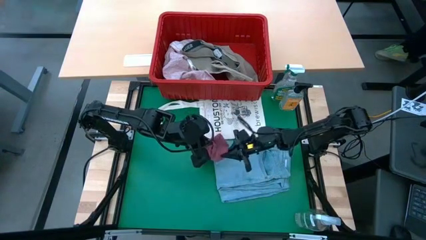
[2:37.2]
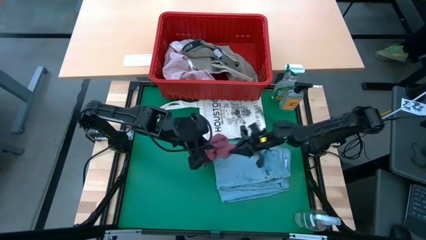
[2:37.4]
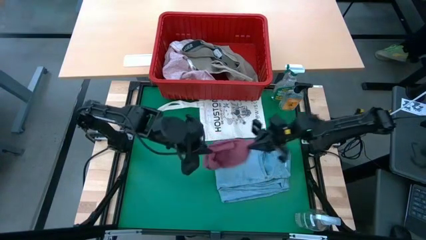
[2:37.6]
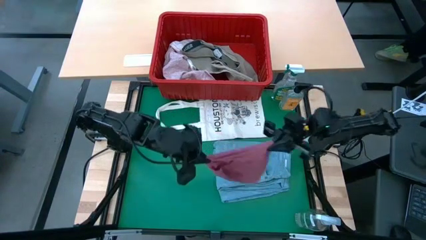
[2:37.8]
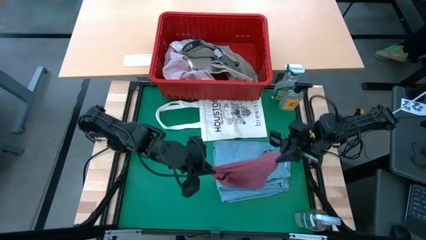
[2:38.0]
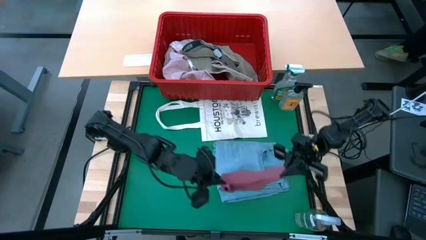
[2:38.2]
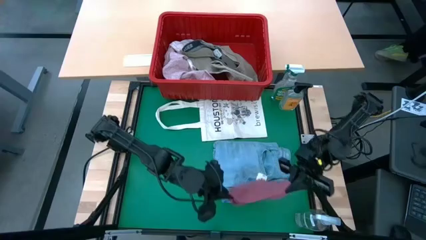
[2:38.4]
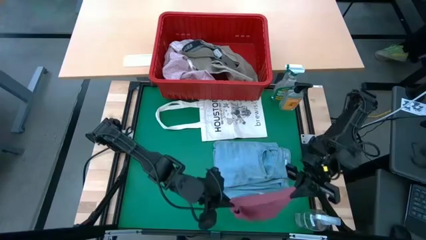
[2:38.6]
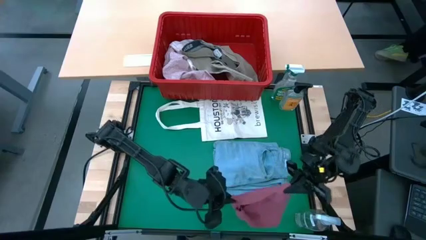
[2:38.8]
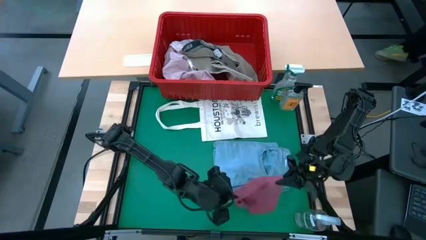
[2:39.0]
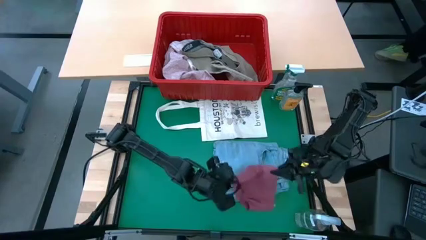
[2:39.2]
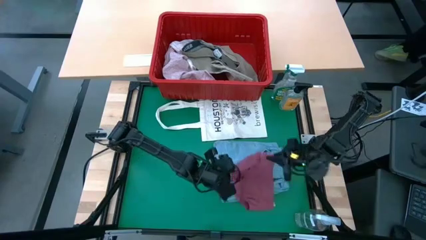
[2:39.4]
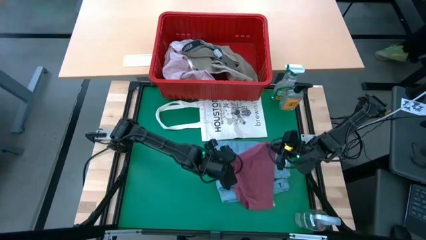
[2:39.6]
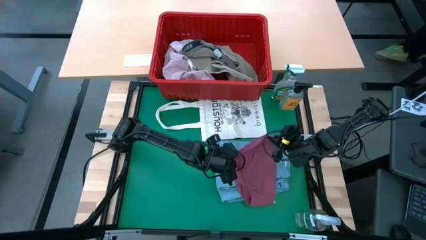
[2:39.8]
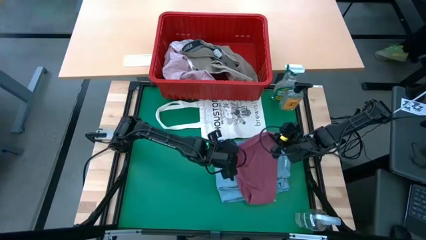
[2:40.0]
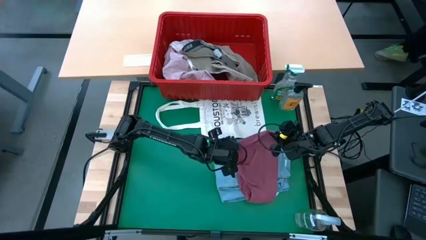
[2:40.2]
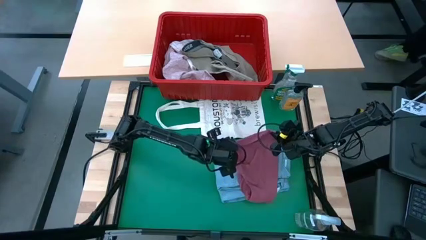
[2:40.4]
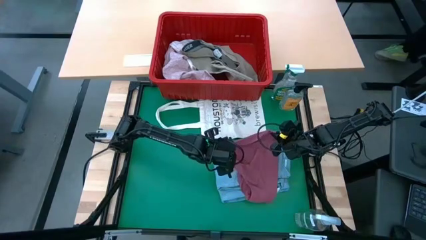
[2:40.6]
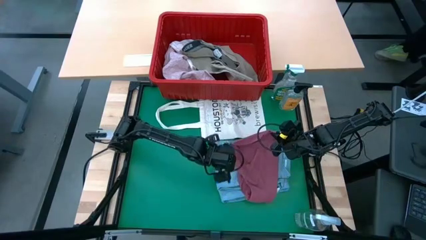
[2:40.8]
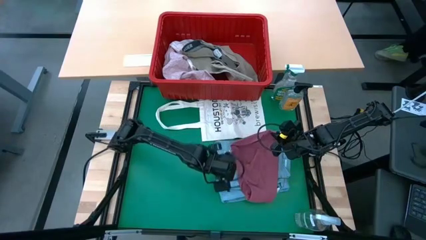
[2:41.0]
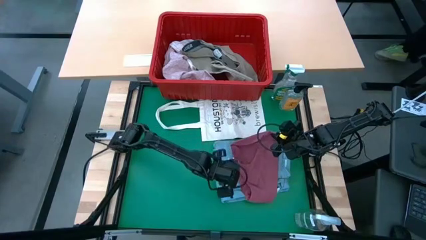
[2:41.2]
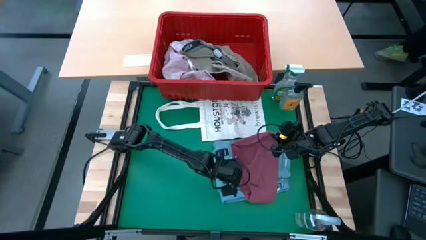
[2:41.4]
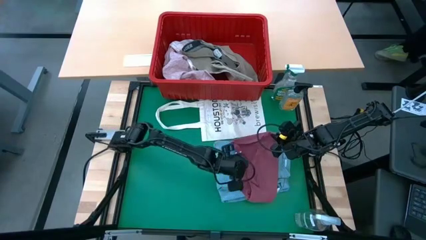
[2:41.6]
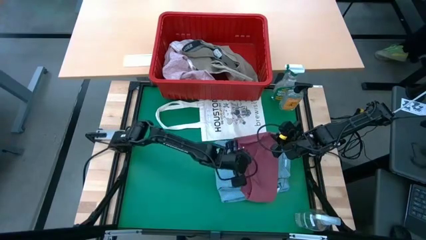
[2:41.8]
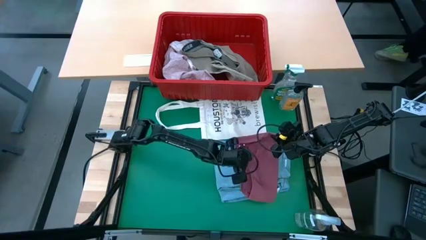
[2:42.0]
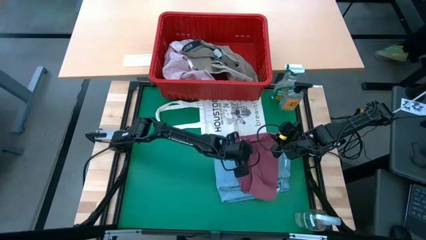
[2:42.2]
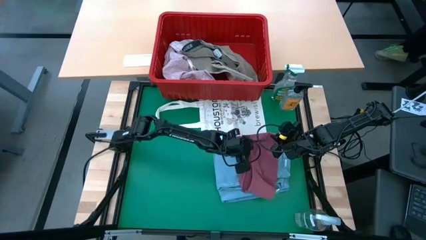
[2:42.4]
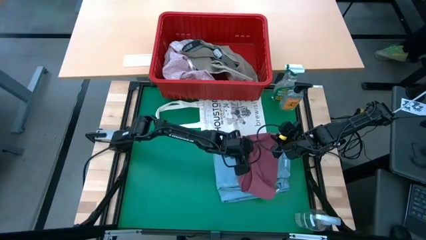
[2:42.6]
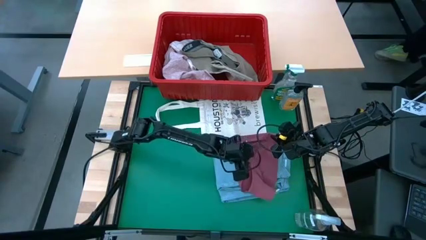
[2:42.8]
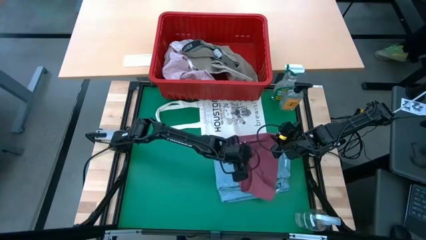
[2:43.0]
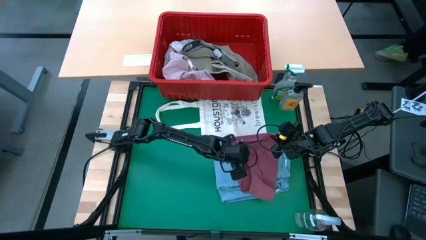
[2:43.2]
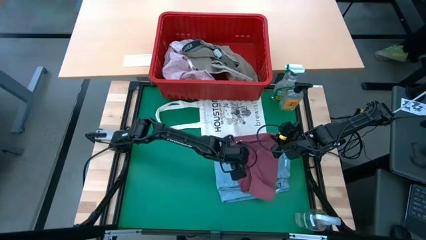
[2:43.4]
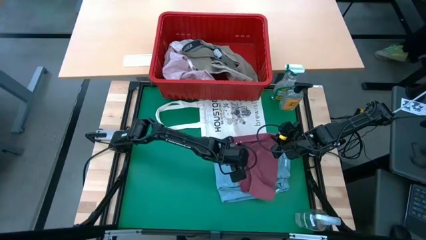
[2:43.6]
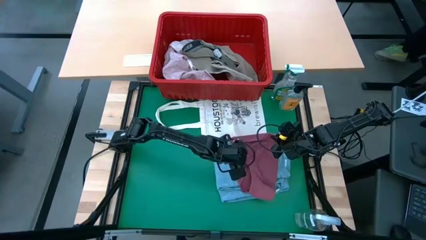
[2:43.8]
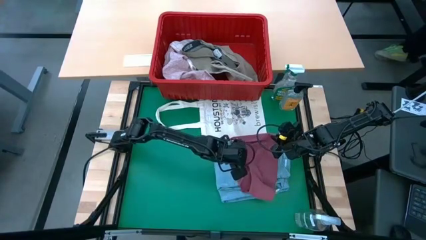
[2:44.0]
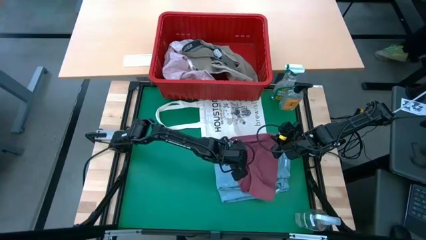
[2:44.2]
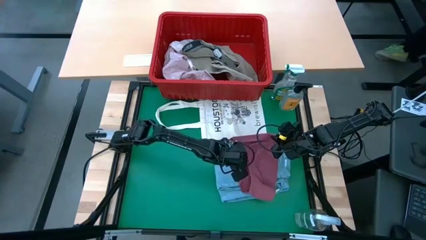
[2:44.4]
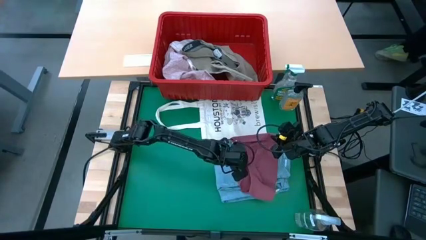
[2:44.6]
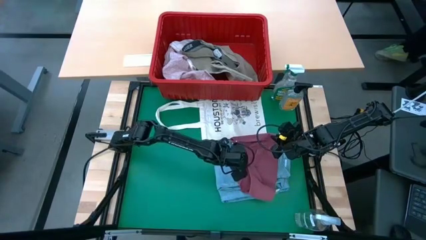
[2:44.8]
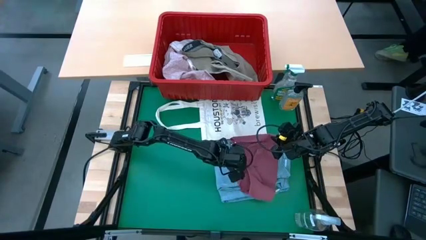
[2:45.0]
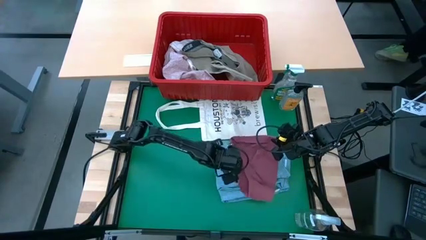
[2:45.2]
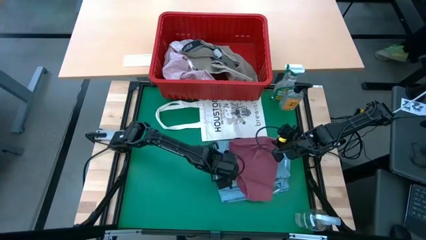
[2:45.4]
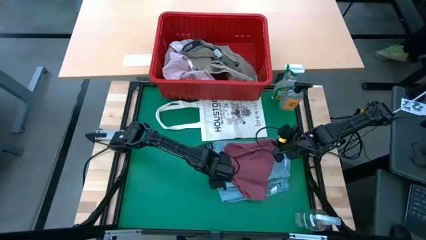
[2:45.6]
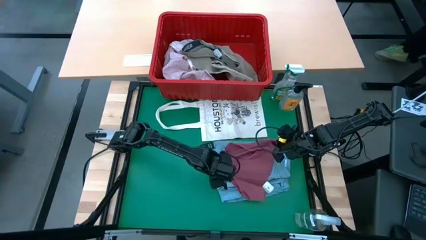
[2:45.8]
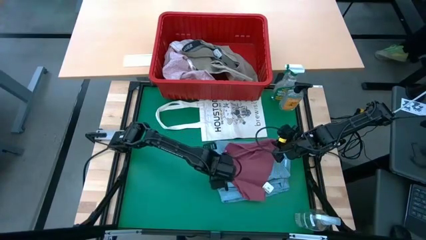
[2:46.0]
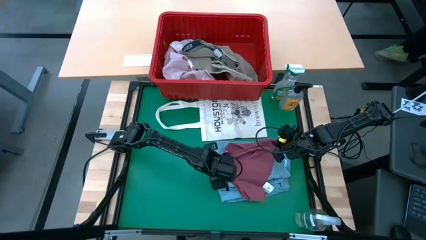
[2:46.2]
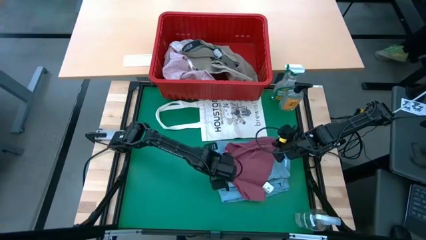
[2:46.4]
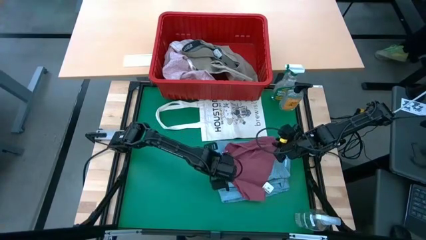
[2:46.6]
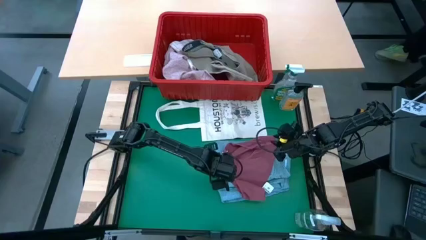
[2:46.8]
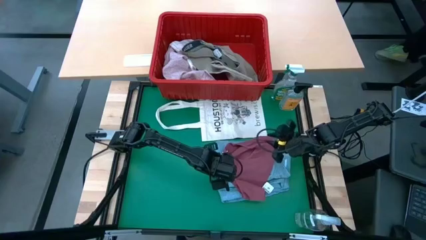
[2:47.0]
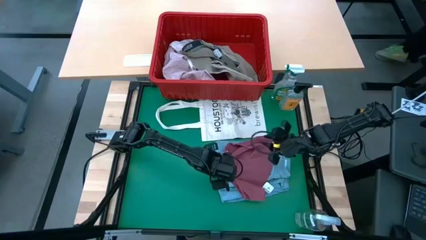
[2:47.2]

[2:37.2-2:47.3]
Task: Fold Laundry from Bin
Fold the red underwear from the red laundry basket

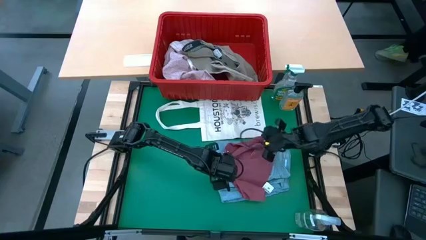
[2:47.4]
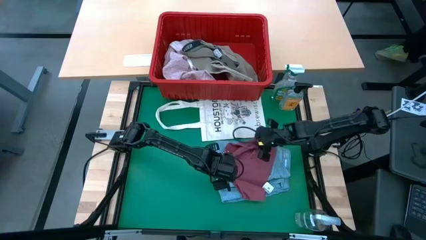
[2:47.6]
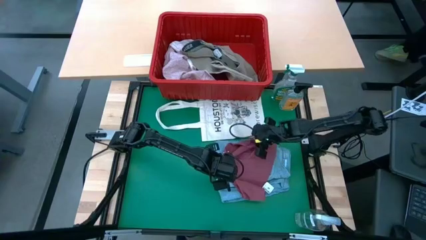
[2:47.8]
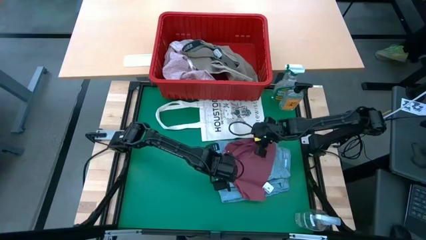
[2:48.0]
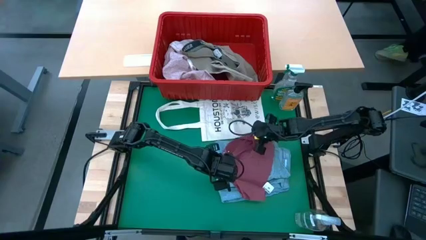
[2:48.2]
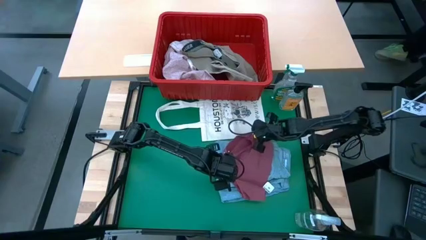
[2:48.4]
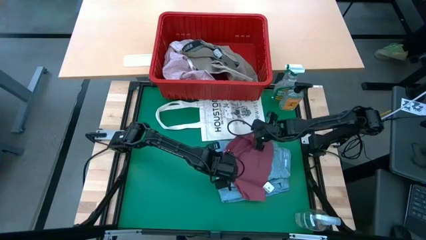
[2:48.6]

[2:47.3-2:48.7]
Fold the red underwear from the red laundry basket
